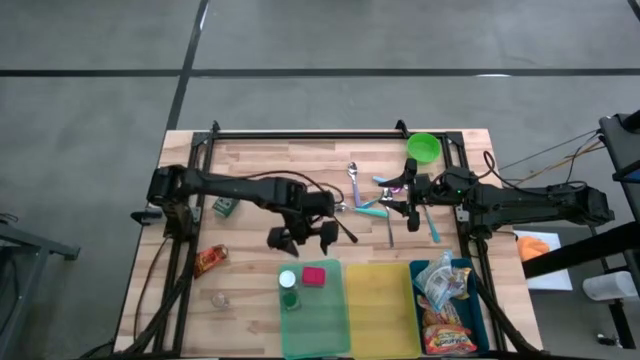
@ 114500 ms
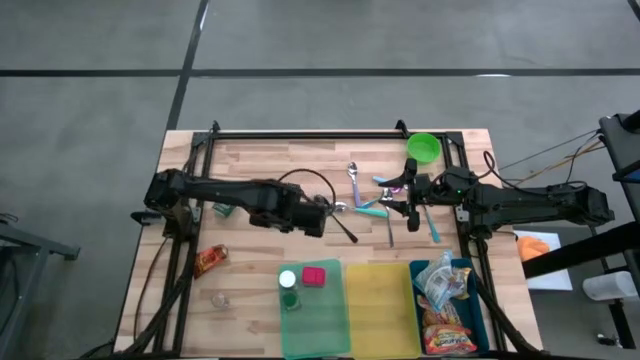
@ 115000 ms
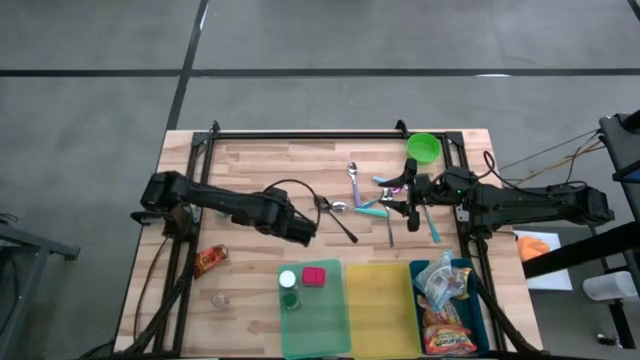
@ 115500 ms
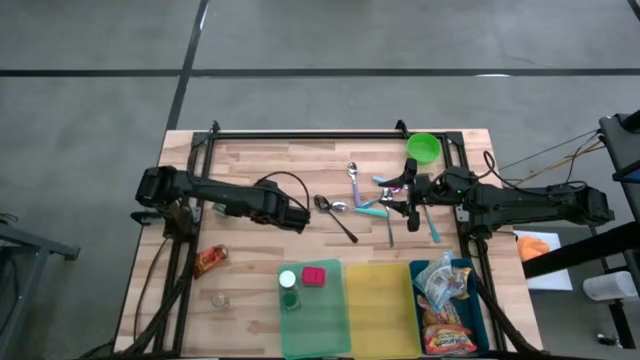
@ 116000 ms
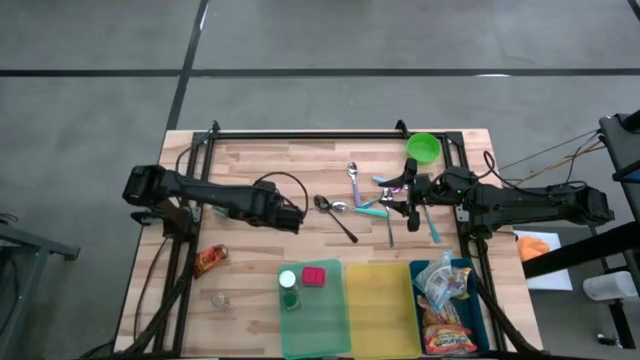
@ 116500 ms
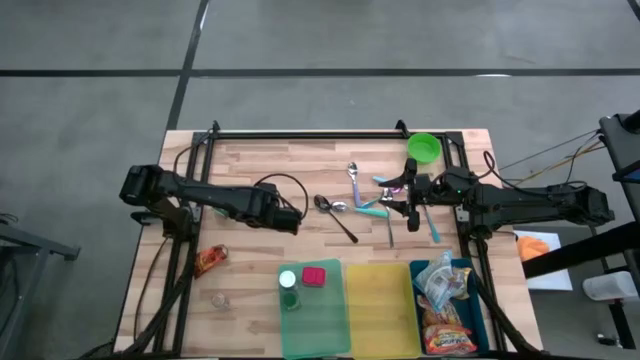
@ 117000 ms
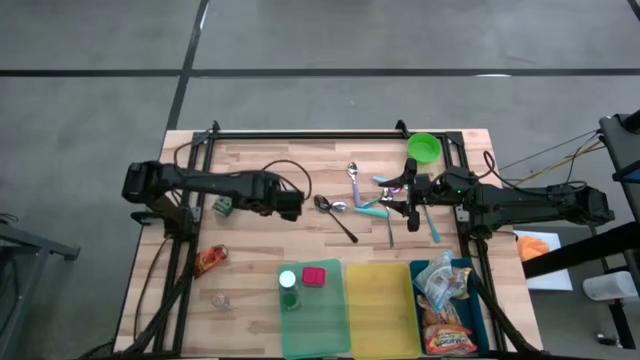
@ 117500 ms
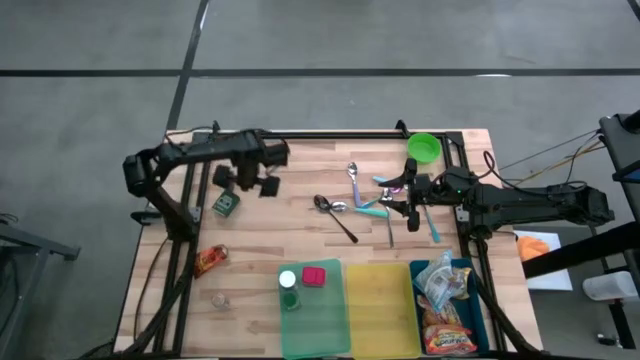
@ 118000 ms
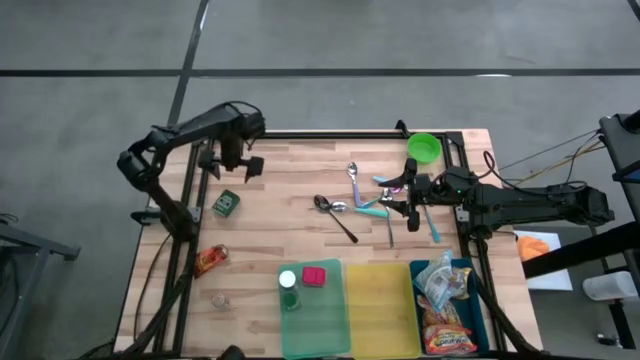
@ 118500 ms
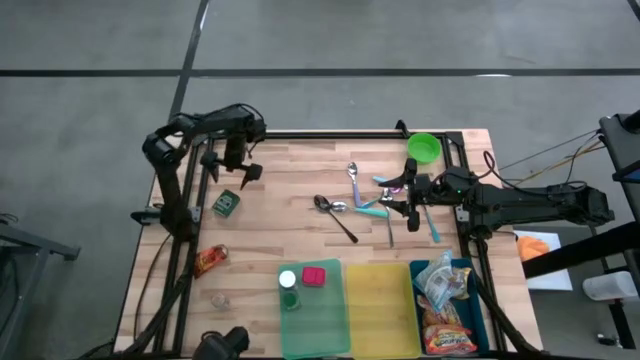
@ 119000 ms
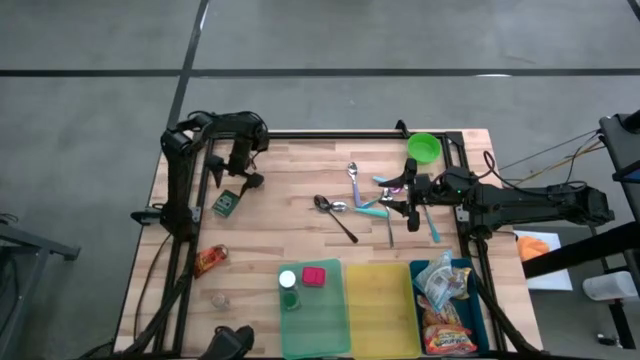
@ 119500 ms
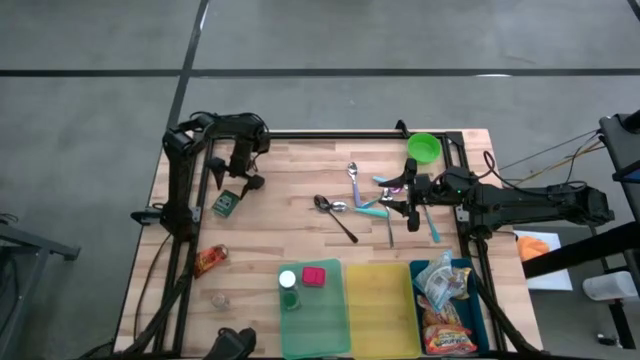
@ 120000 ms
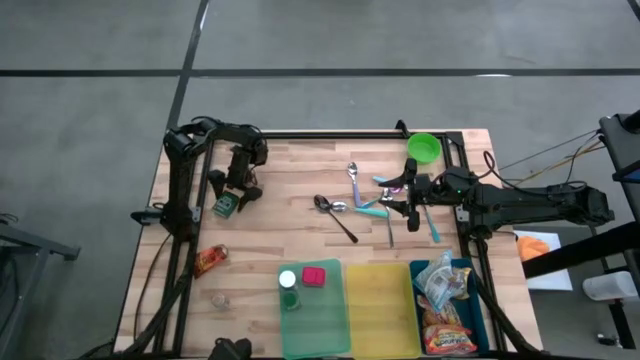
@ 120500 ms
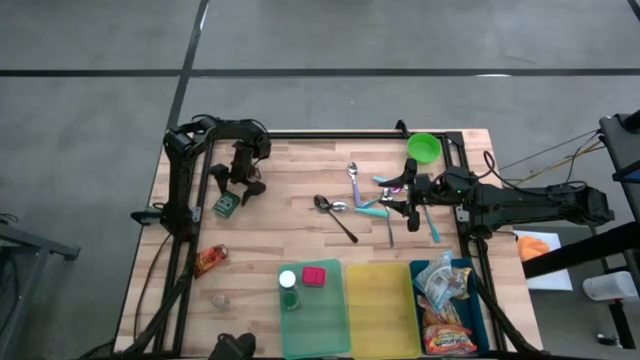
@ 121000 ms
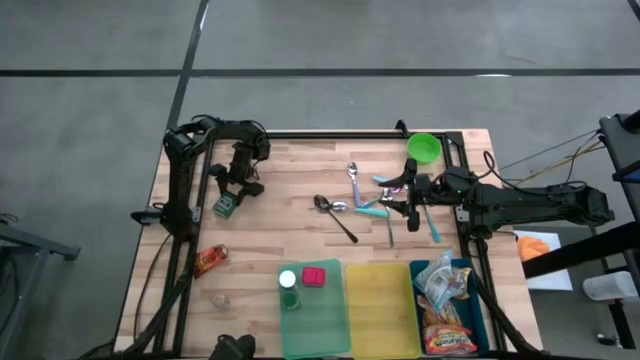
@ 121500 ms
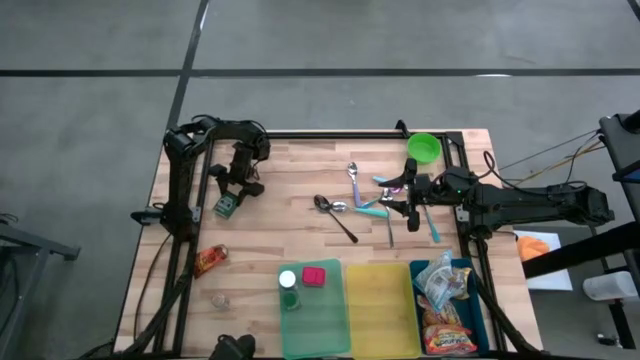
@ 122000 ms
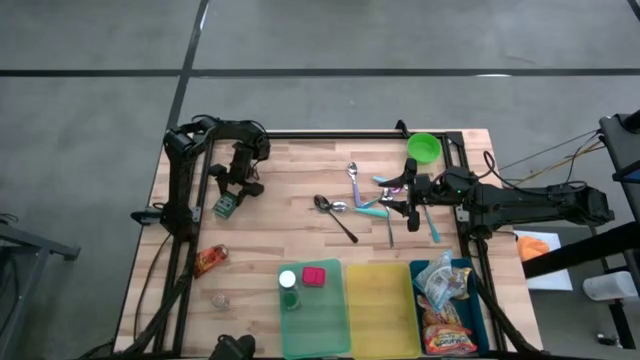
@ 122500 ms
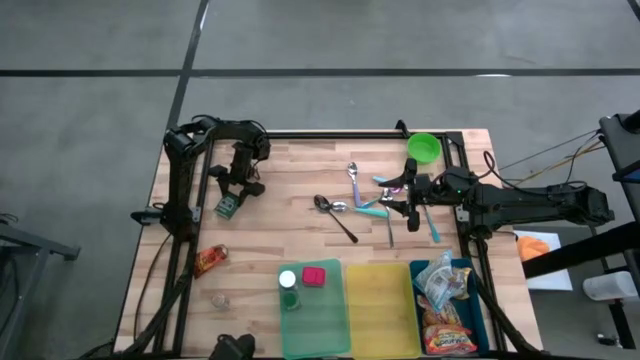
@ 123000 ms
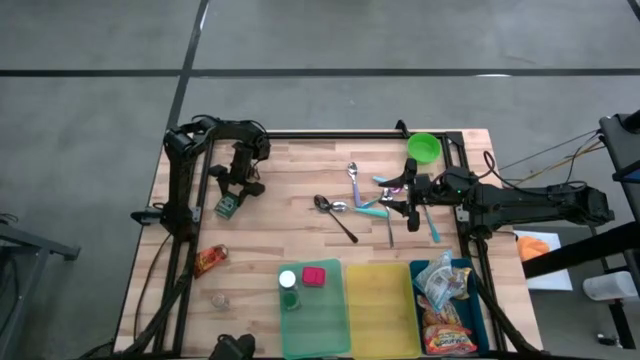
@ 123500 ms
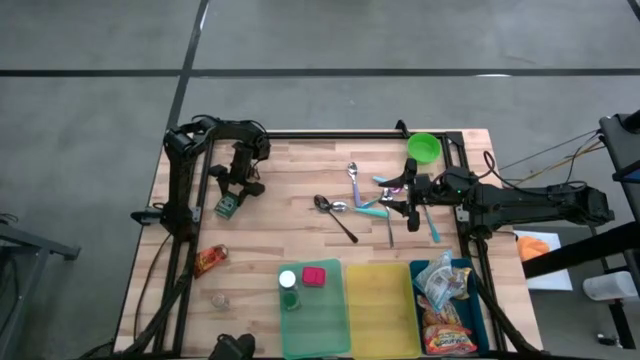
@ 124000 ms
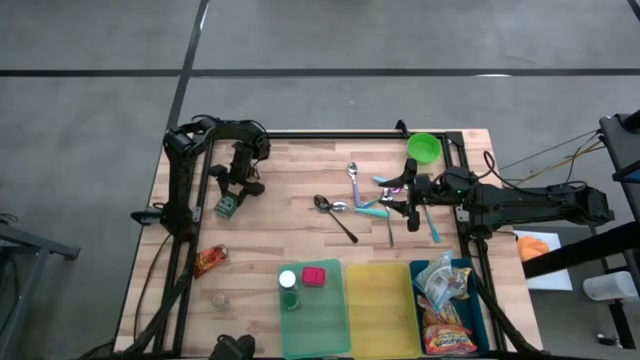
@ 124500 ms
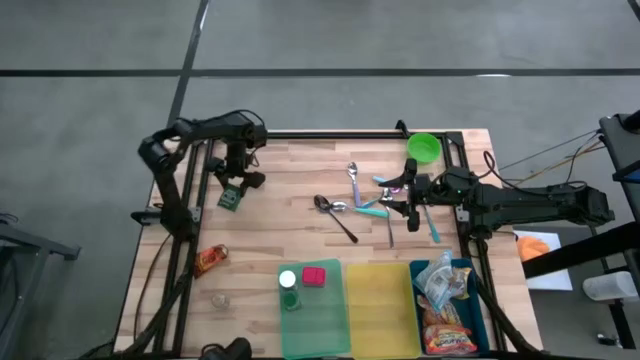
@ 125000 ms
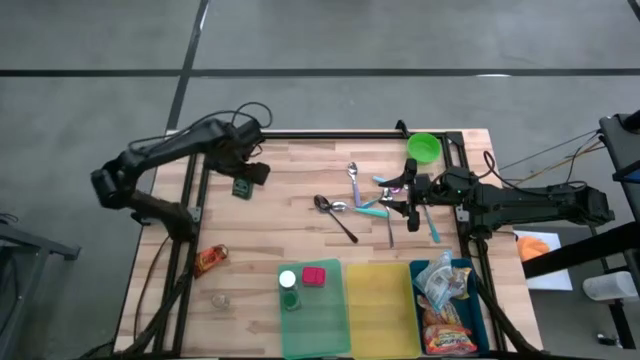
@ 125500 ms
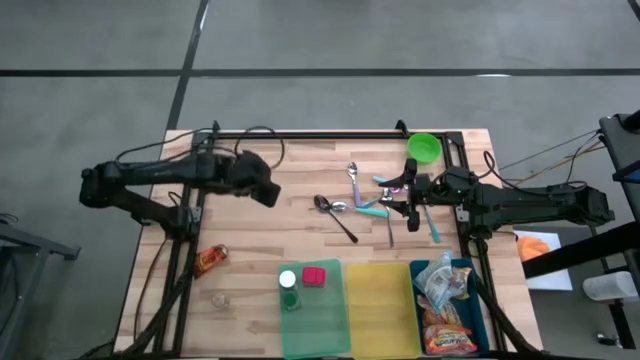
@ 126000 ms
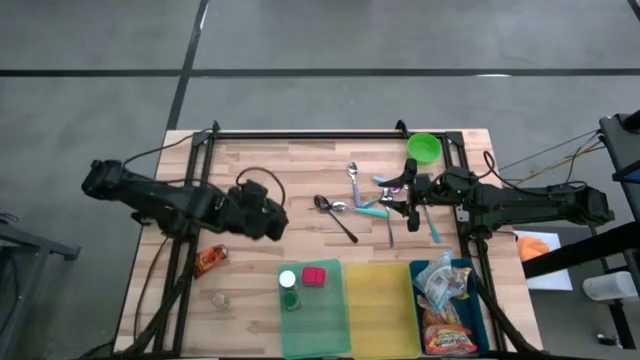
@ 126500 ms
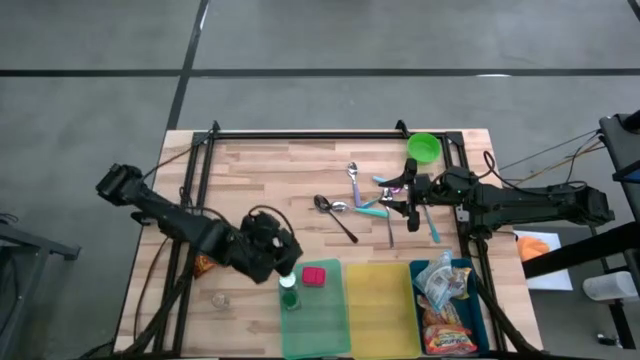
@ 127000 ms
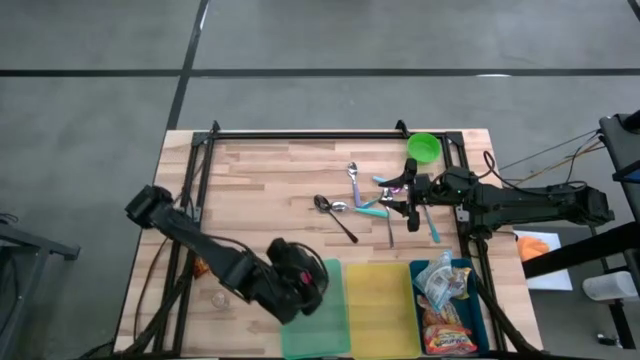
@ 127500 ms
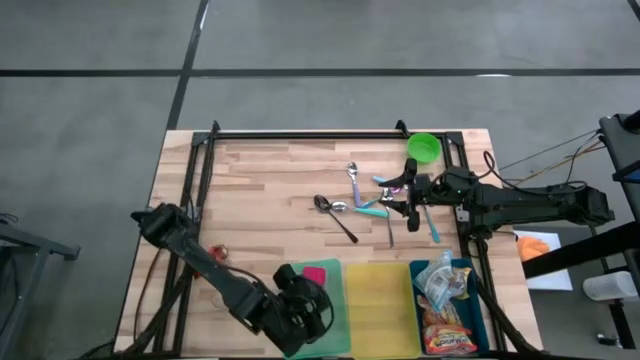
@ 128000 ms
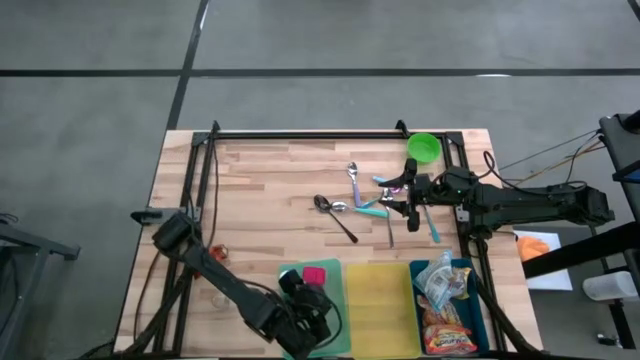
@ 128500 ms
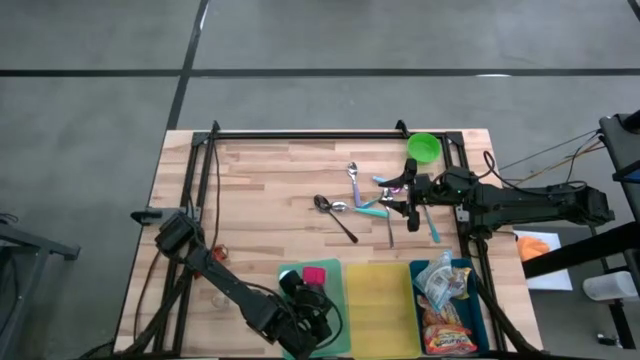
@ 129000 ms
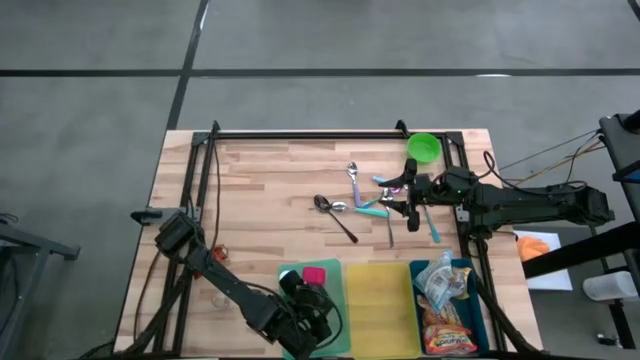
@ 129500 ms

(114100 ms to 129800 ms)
Put the black seasoning can into the green bin

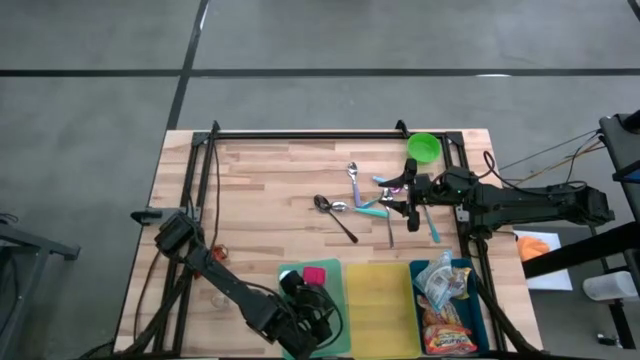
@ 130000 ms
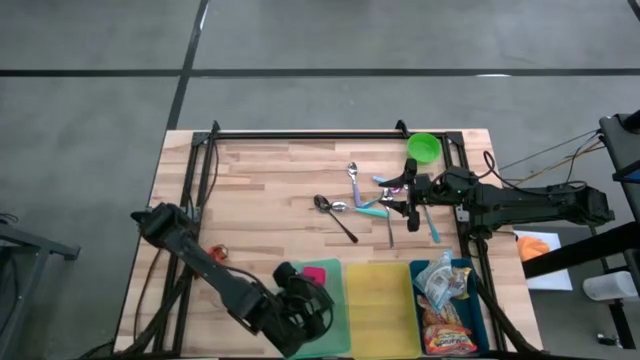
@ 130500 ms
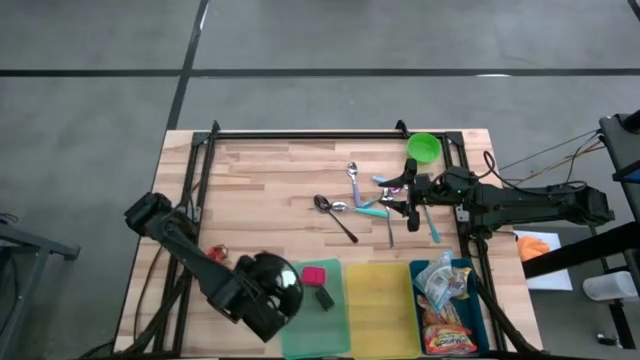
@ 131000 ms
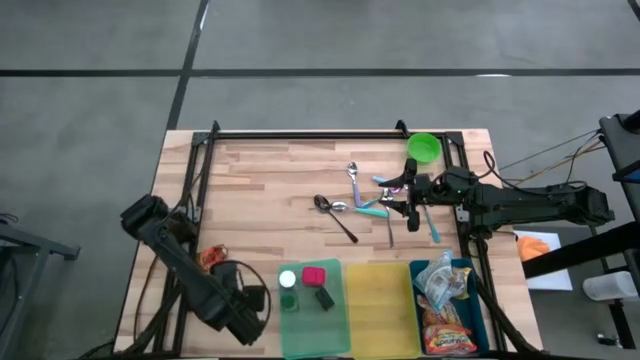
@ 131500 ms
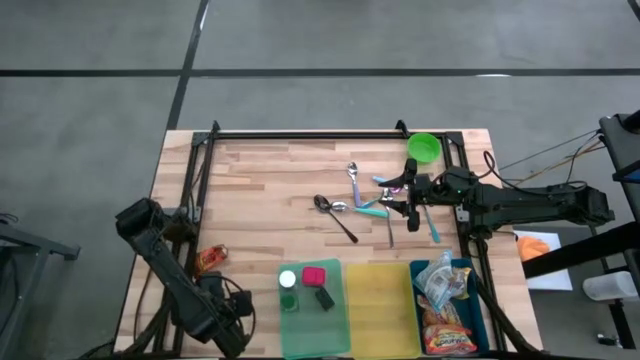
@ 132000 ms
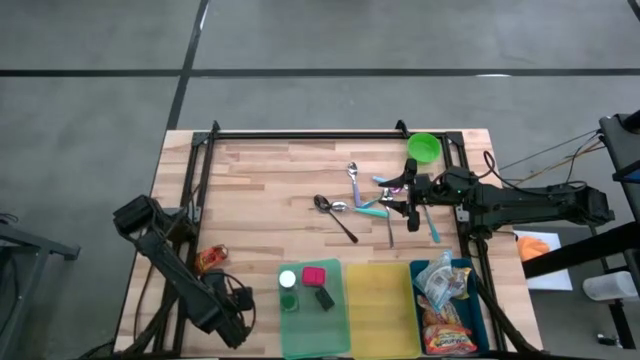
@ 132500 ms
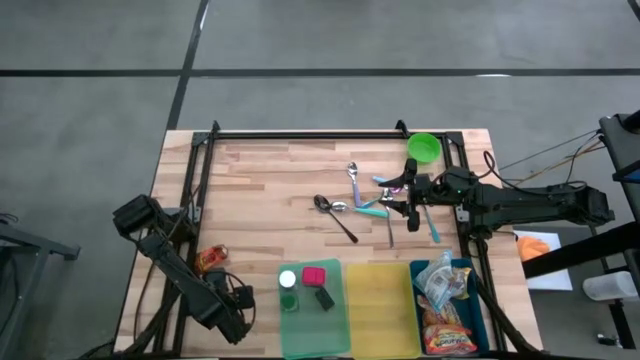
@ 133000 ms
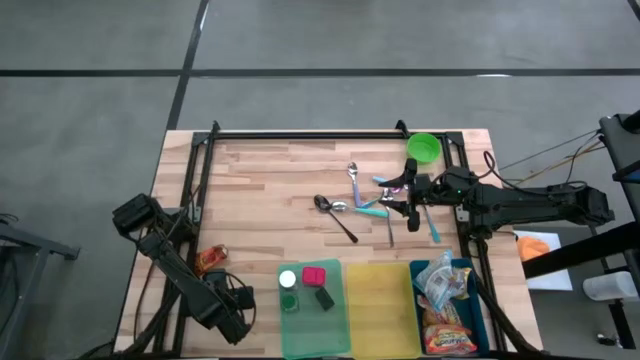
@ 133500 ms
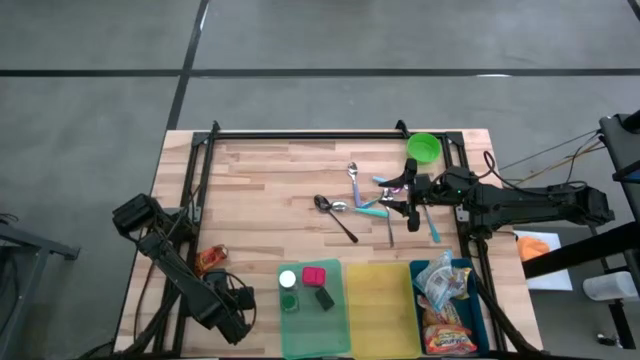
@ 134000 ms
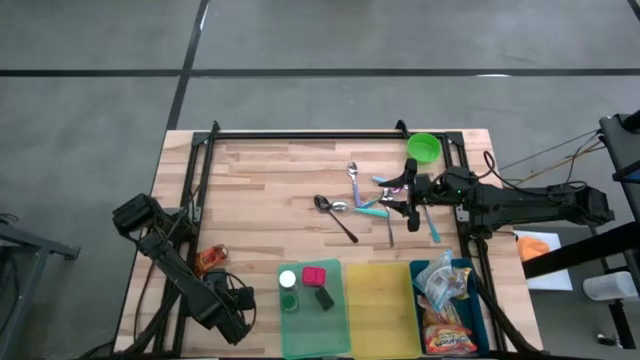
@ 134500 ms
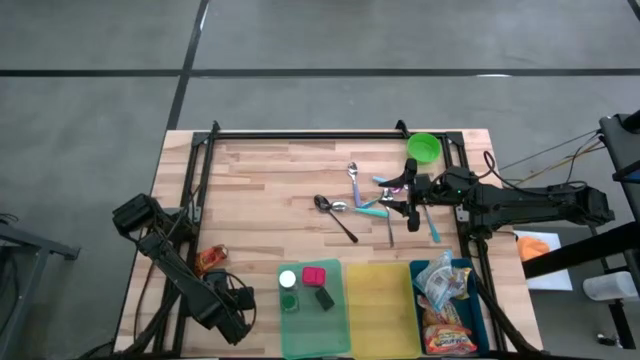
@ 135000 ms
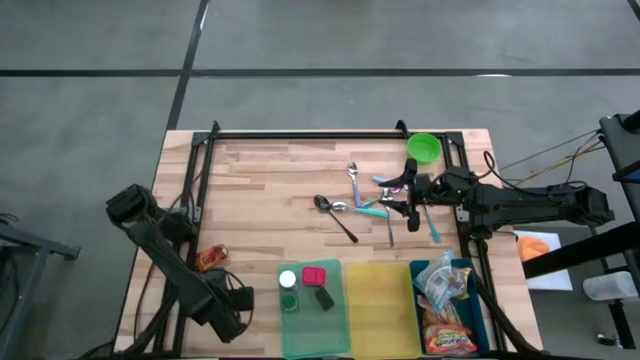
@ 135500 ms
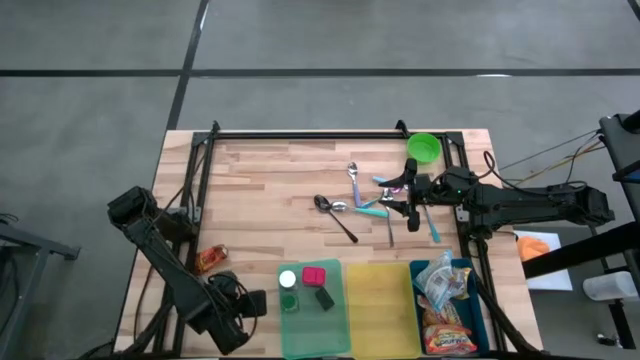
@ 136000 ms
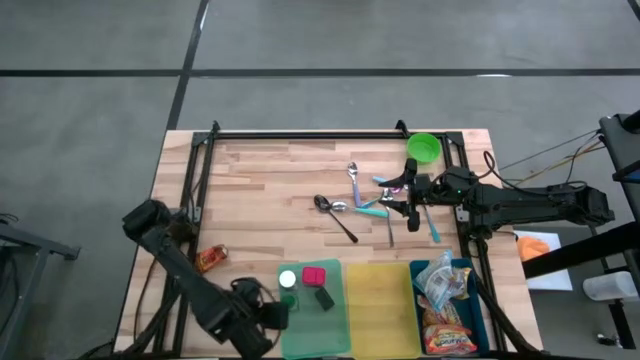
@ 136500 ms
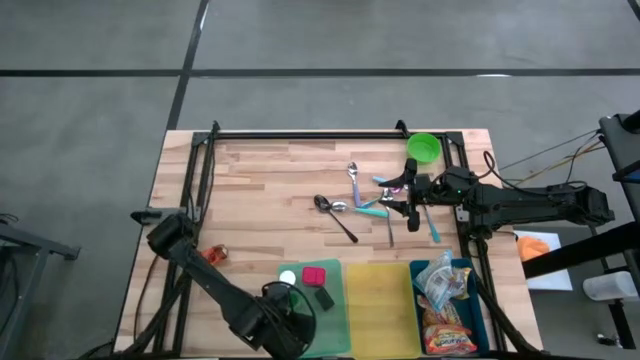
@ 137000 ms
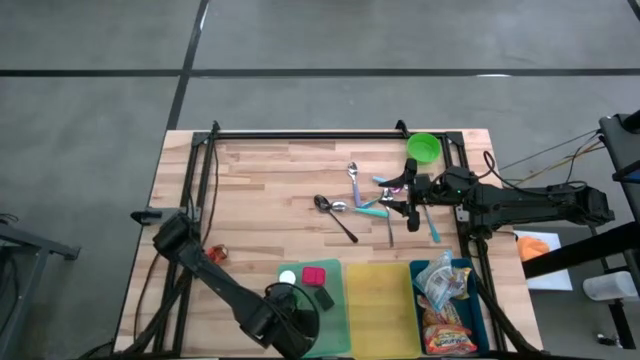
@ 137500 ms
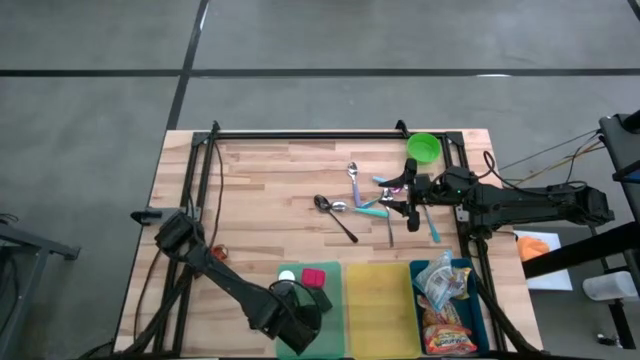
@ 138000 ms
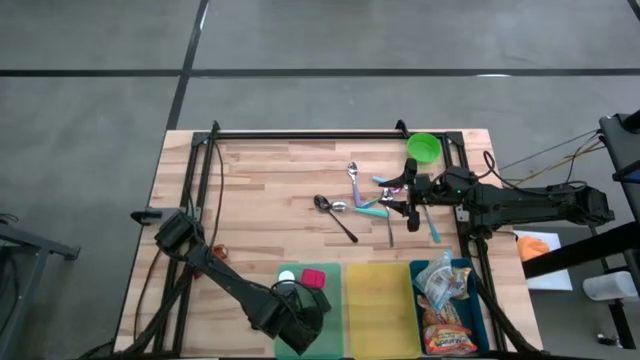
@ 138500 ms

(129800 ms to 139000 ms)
Put the brown seasoning bottle into the green bin
